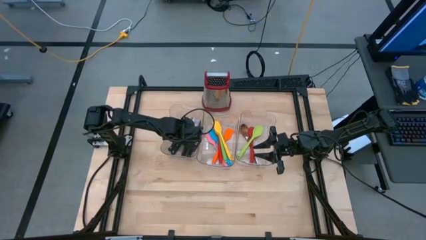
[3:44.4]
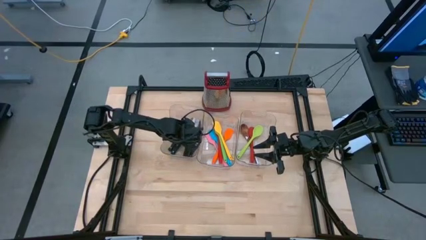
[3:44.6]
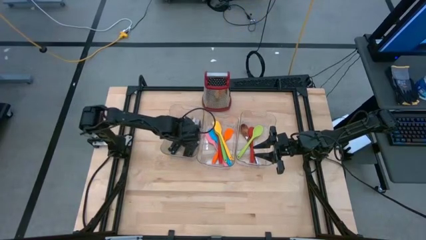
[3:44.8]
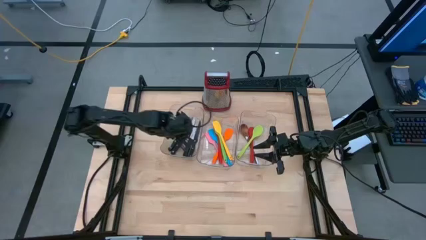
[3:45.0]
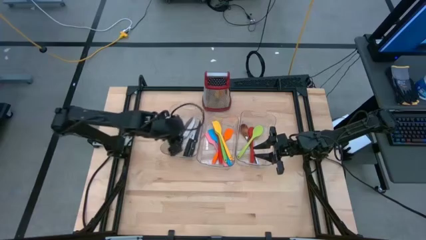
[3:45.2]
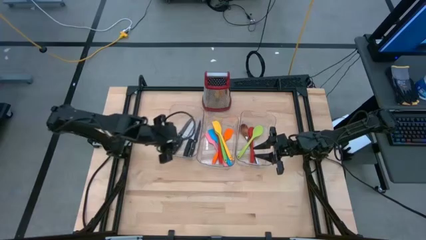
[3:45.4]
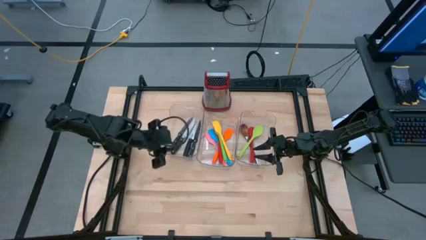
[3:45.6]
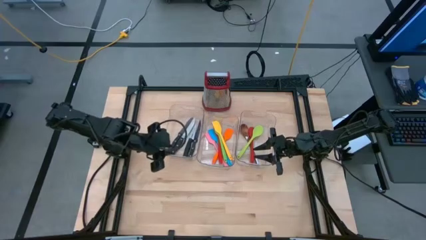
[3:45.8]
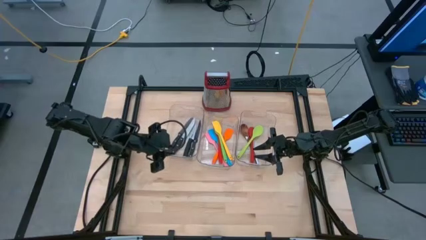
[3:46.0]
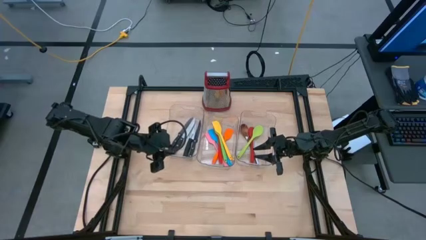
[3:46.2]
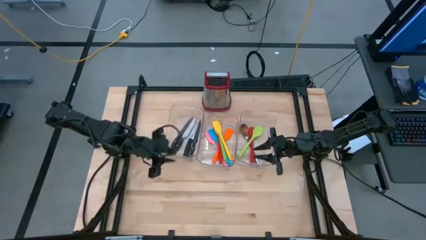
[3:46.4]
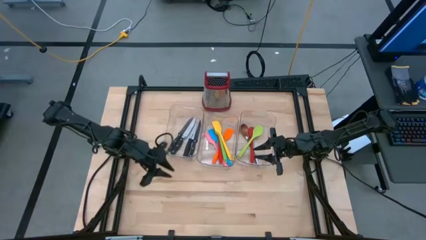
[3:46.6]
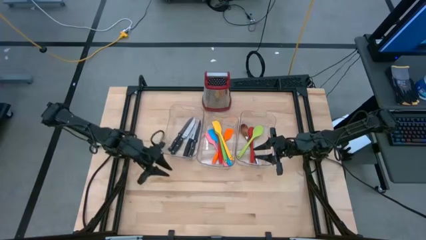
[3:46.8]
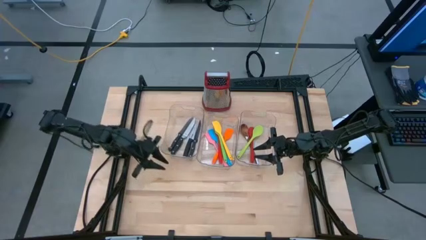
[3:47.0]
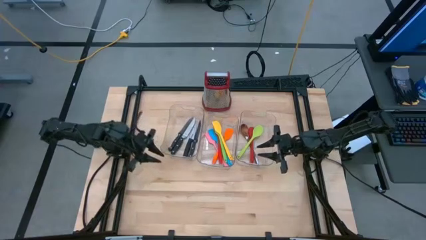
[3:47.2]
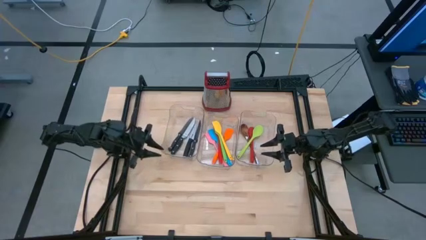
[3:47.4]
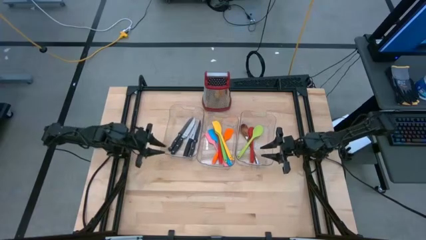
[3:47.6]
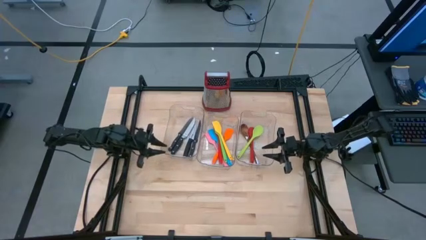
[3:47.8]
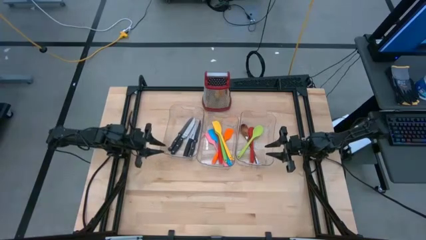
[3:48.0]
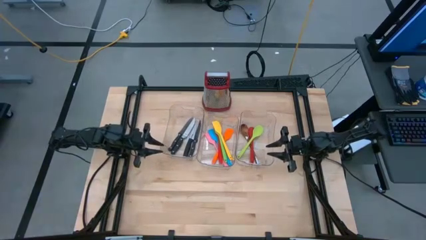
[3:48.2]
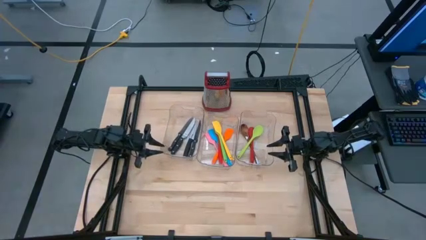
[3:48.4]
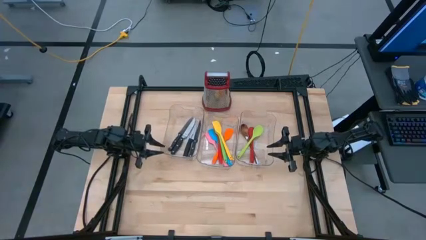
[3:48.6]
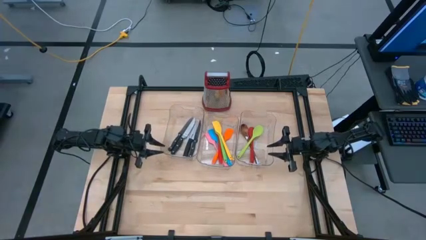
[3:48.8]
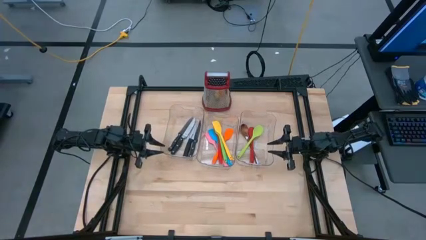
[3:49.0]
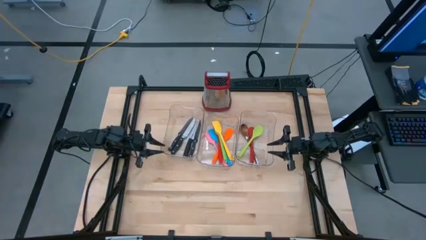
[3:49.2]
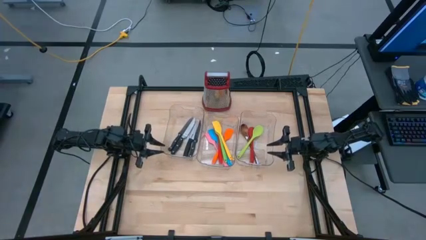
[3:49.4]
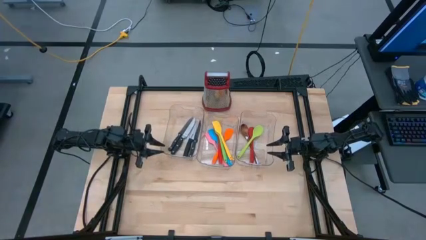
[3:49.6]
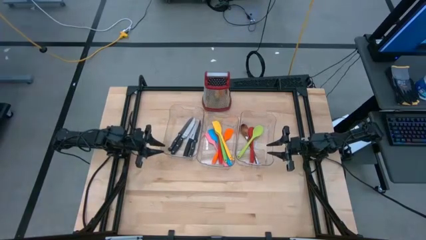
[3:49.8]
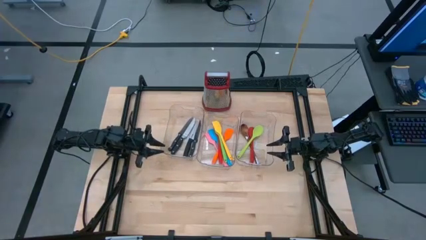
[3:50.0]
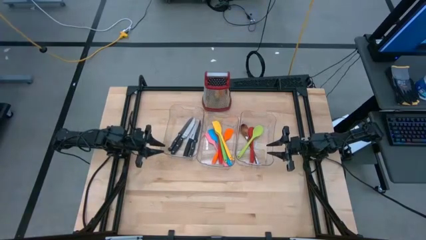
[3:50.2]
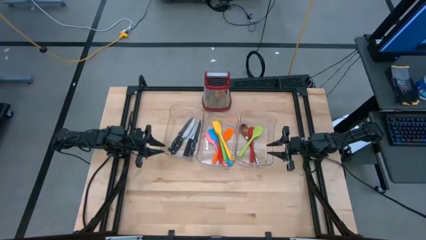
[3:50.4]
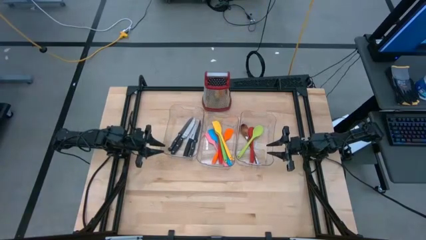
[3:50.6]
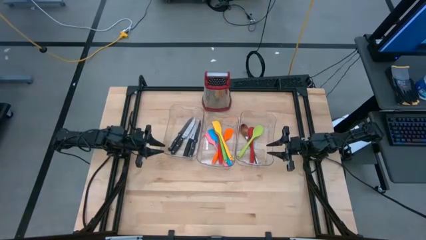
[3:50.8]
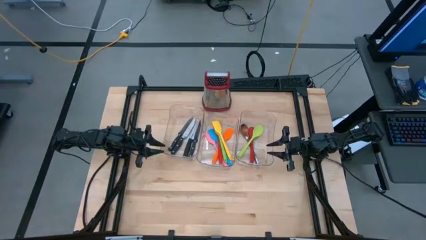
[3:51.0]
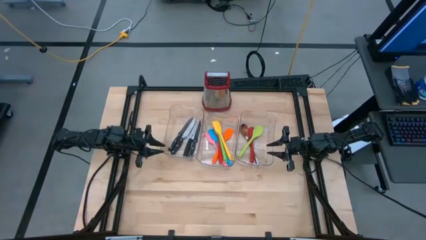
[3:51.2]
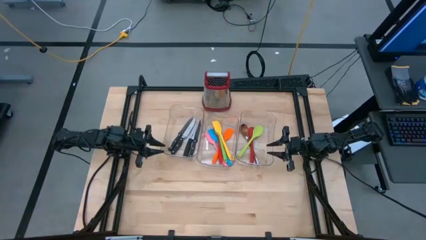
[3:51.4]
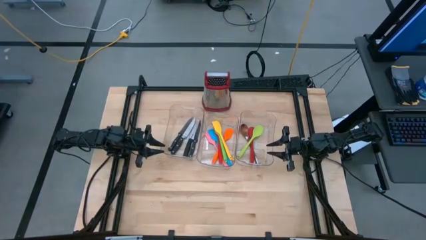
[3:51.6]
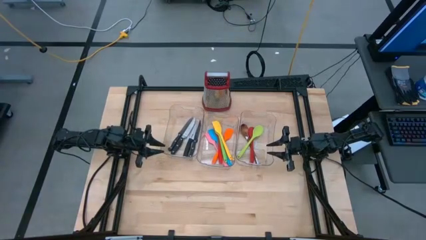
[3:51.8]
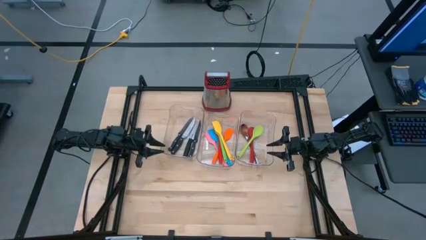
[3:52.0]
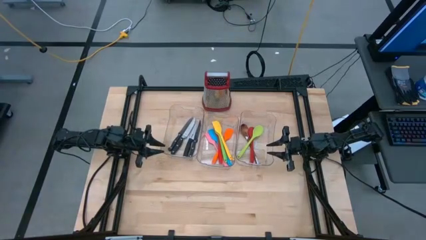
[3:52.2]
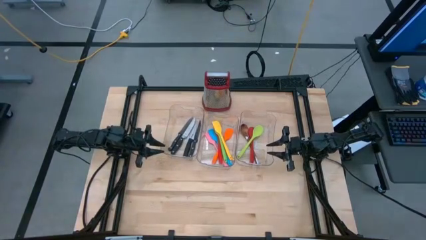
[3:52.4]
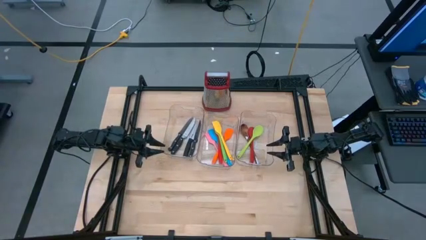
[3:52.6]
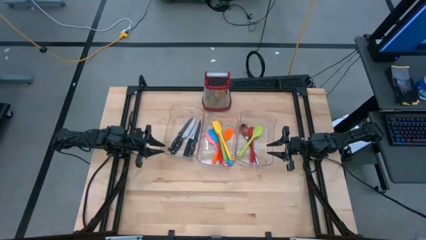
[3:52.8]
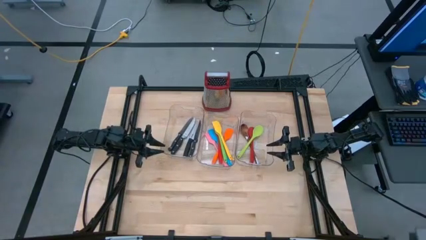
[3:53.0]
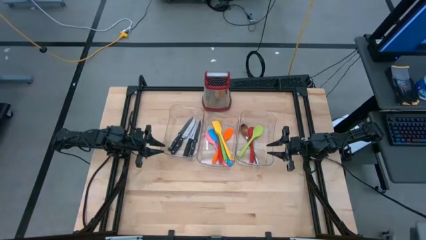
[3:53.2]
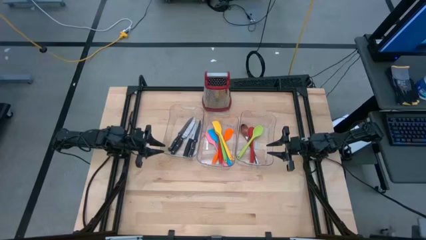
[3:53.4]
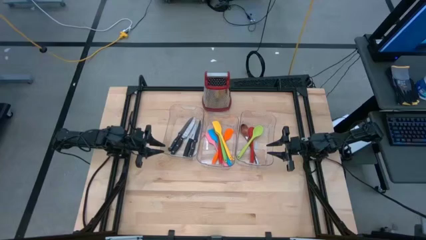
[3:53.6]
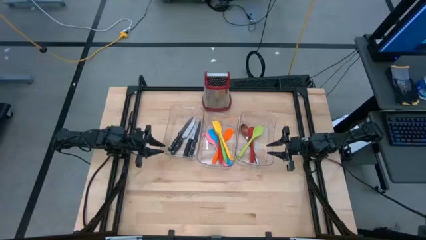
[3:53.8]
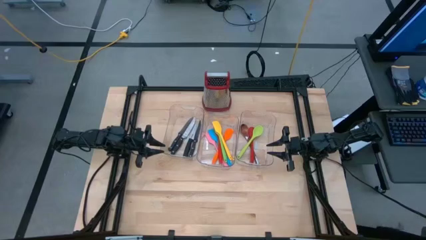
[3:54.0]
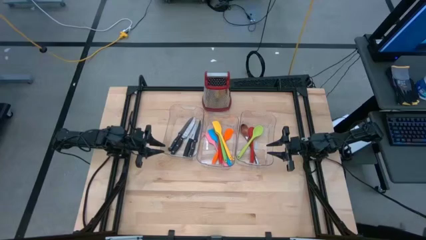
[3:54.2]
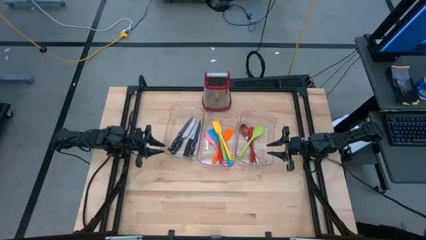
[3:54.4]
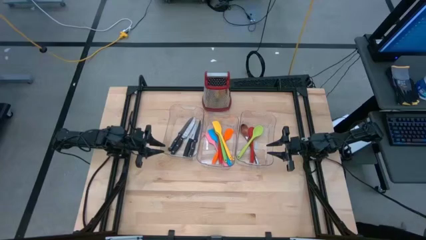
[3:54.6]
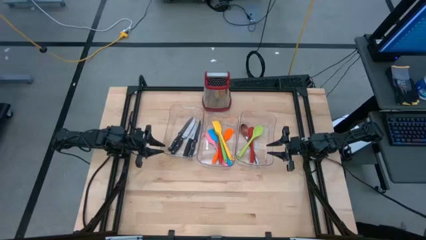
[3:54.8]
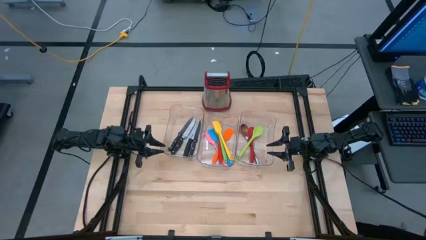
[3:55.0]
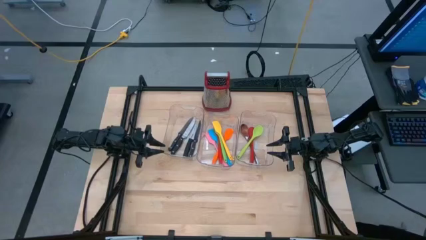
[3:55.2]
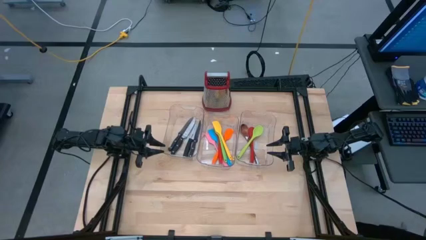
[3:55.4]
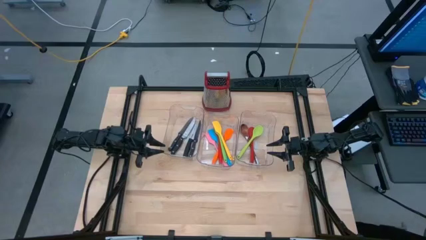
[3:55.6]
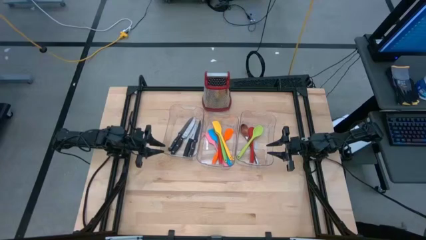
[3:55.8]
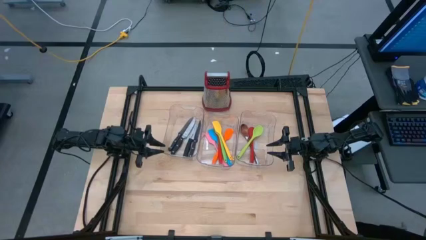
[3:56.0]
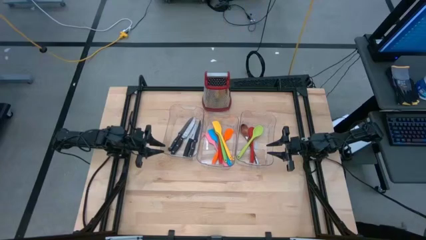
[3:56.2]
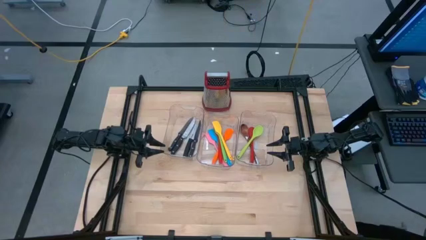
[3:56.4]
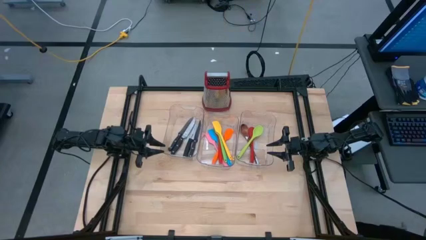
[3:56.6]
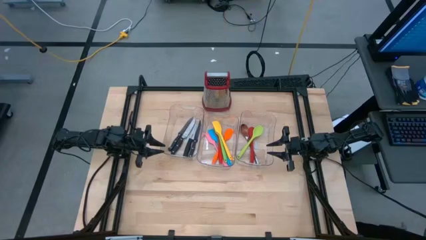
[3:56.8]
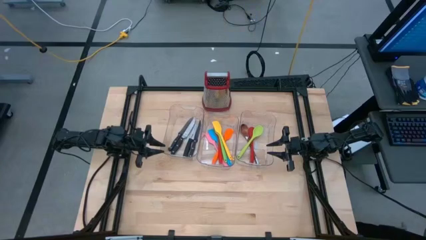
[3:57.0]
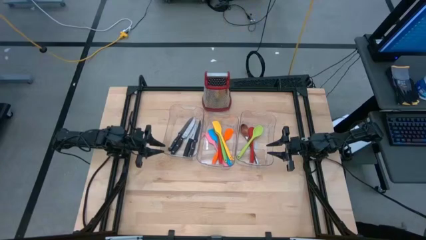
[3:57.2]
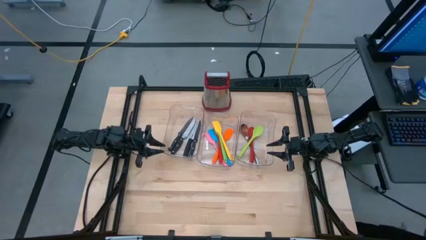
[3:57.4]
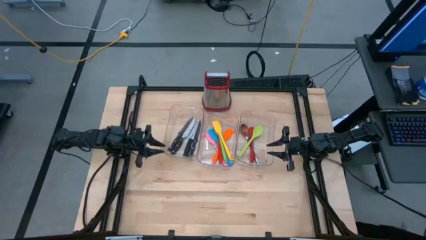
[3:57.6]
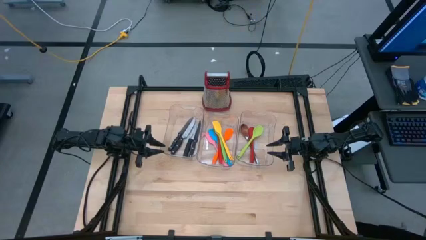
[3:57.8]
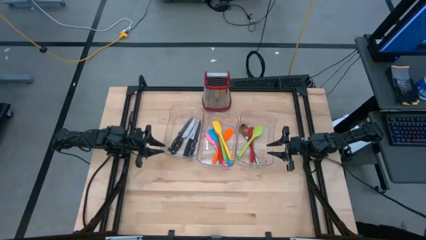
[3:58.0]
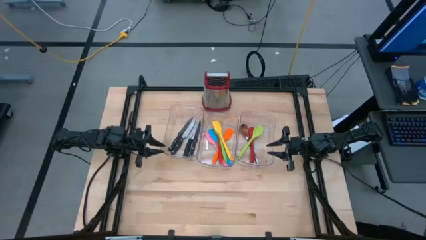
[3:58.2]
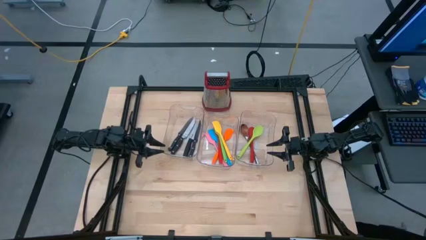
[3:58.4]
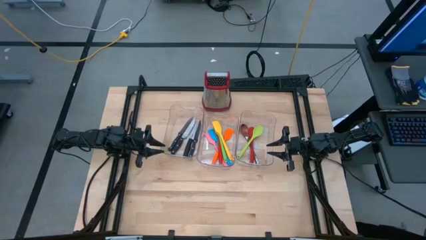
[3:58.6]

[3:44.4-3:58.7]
Task: Pick & Place Kitchen Items
Return to Home Position

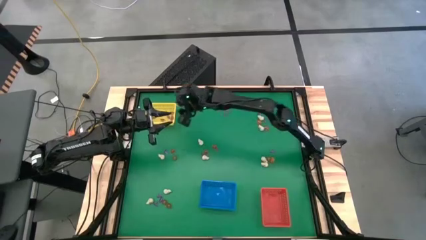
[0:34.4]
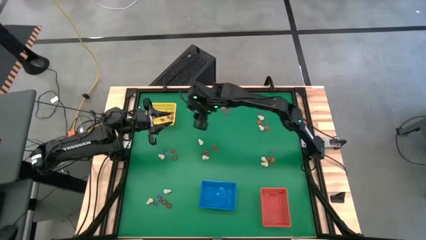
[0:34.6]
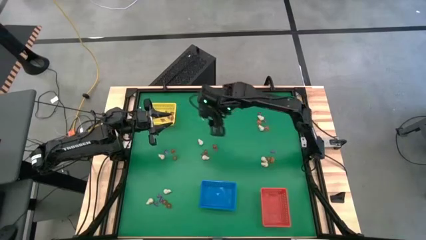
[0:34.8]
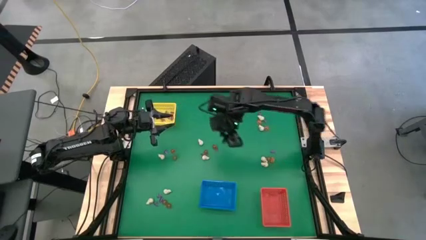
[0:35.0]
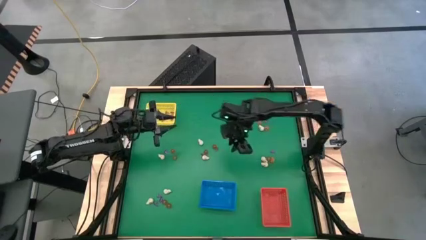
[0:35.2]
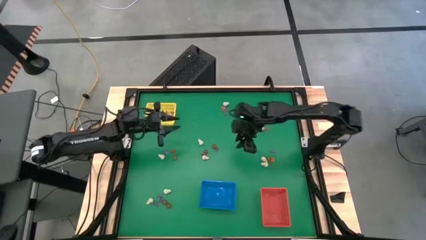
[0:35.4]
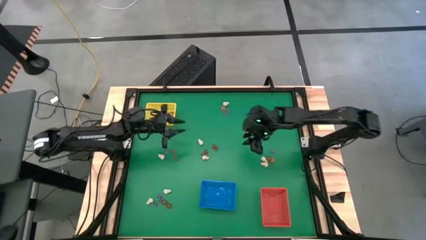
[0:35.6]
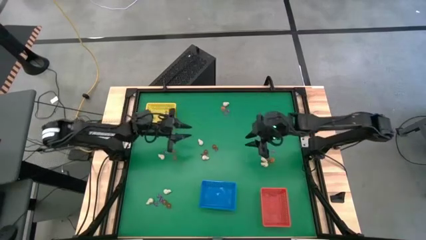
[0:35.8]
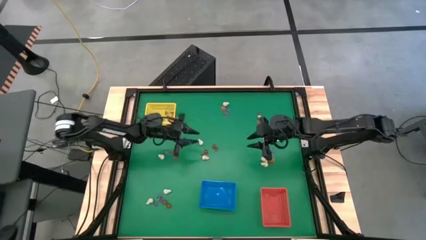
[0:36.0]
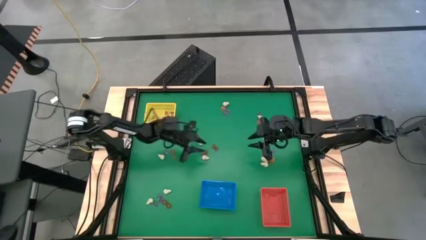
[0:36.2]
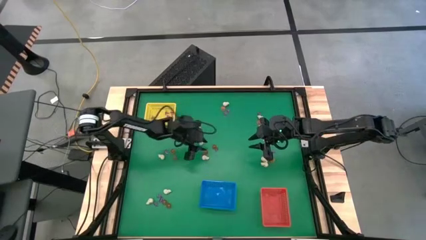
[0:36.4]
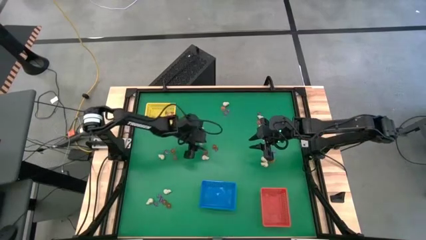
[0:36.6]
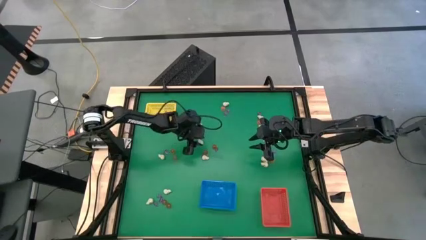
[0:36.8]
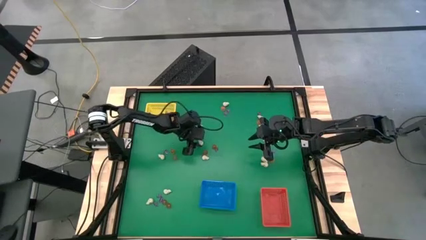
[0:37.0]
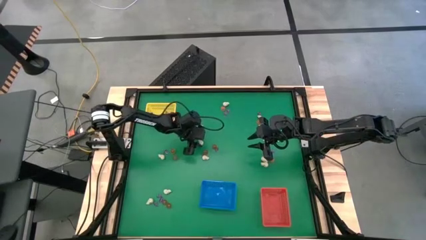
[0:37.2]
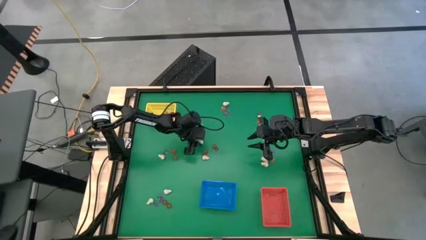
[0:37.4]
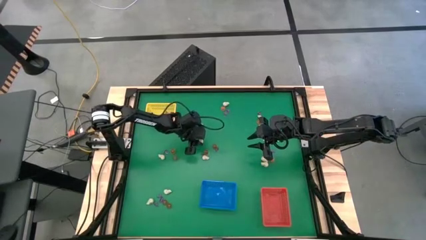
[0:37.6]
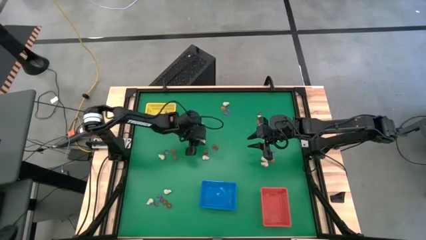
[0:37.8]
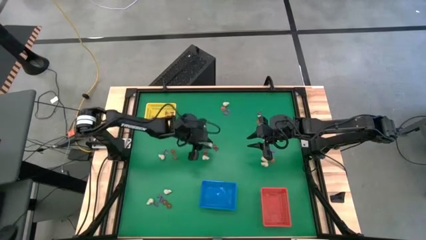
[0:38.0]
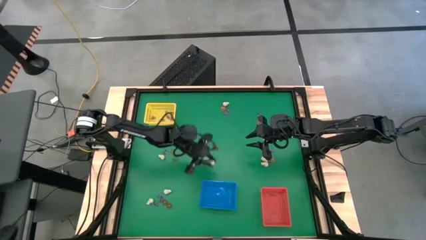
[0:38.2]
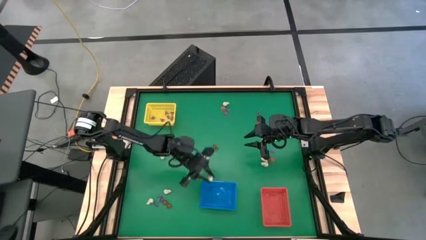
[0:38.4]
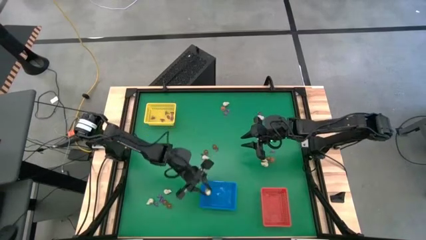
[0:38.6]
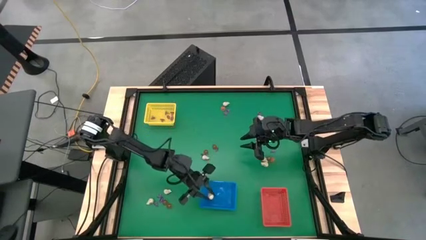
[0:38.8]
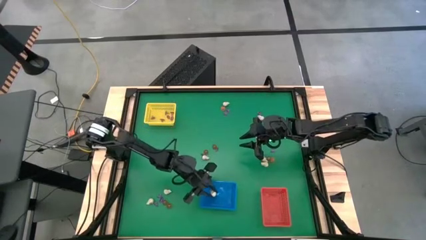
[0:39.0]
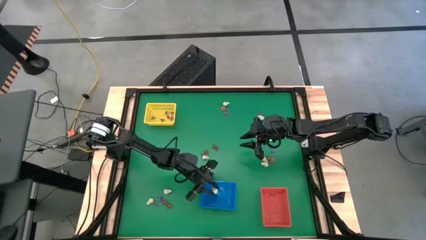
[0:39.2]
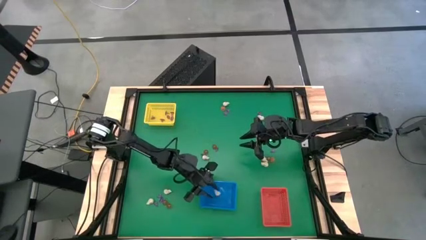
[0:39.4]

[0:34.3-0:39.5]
Task: Sort Halloween decoration
Put the white skull toy into the blue basket
